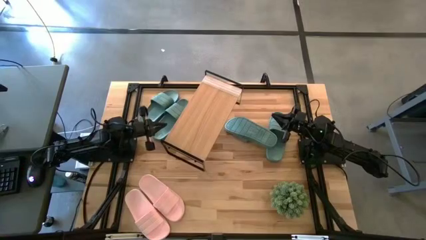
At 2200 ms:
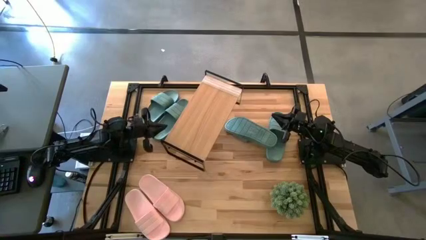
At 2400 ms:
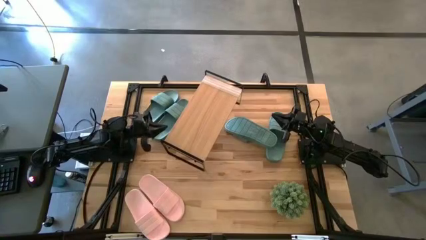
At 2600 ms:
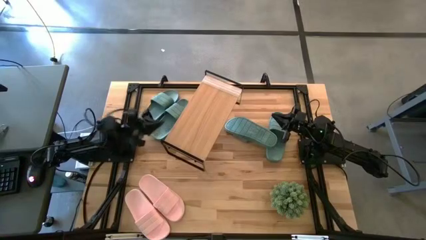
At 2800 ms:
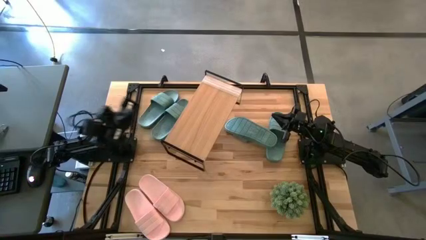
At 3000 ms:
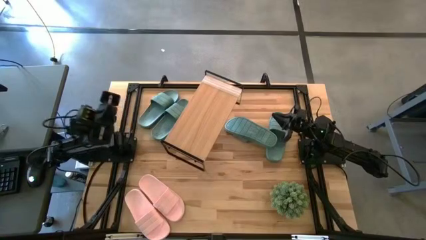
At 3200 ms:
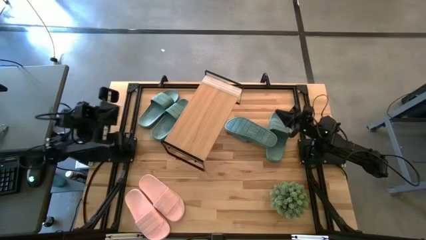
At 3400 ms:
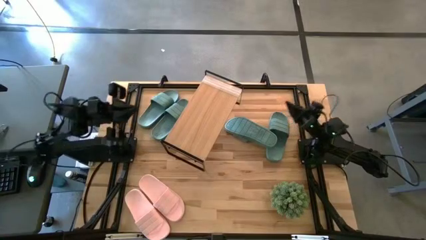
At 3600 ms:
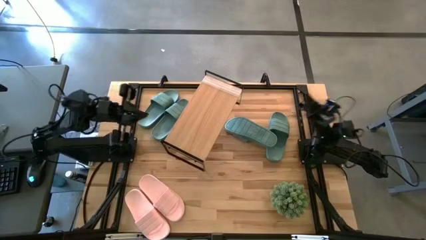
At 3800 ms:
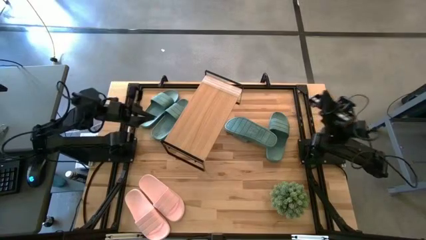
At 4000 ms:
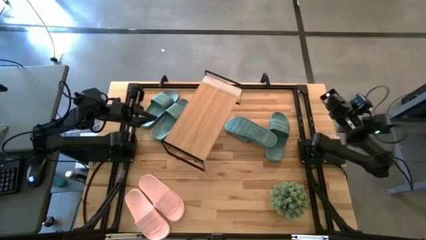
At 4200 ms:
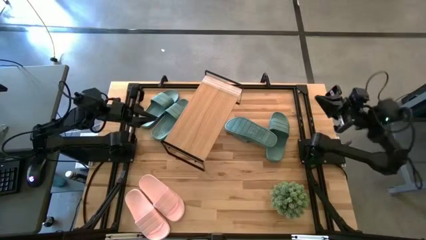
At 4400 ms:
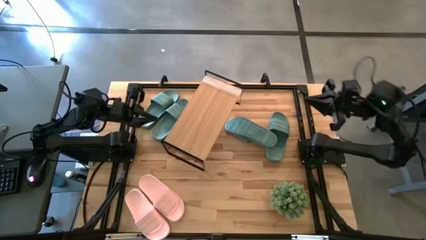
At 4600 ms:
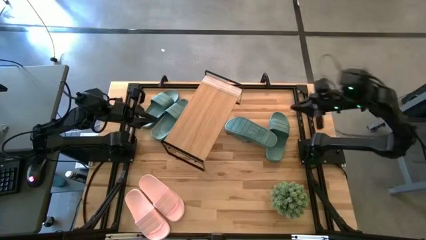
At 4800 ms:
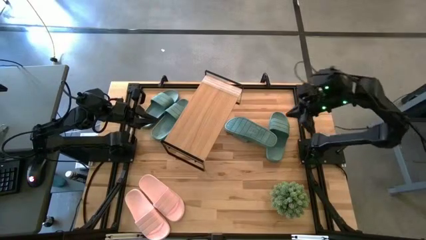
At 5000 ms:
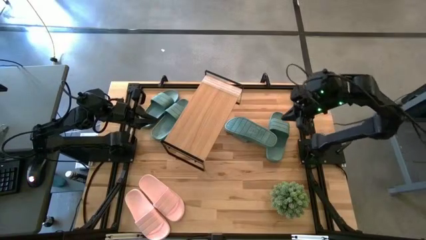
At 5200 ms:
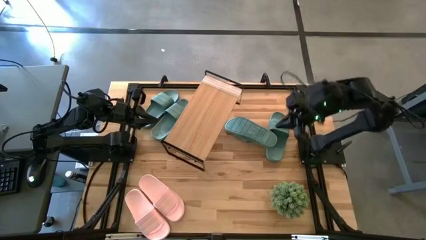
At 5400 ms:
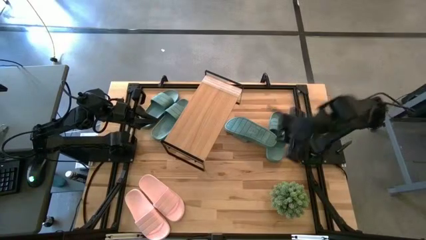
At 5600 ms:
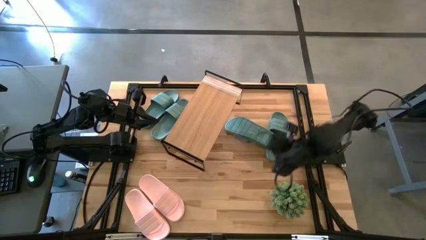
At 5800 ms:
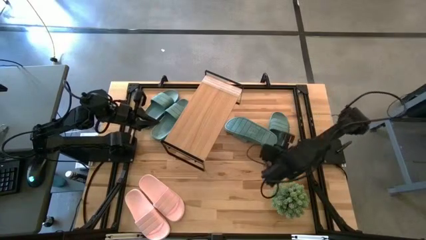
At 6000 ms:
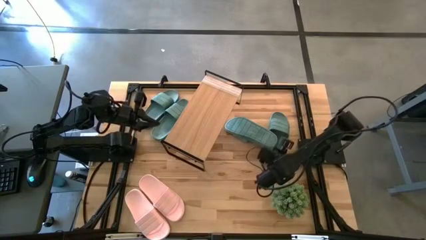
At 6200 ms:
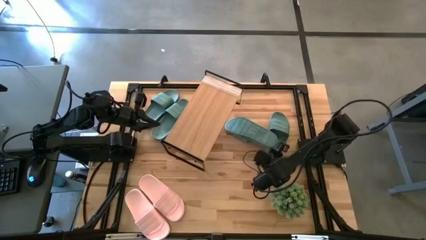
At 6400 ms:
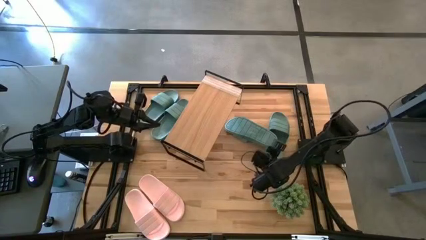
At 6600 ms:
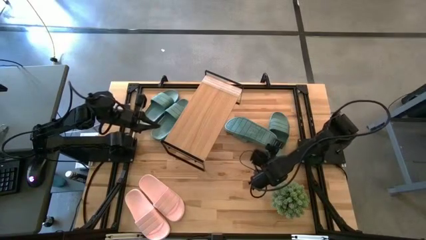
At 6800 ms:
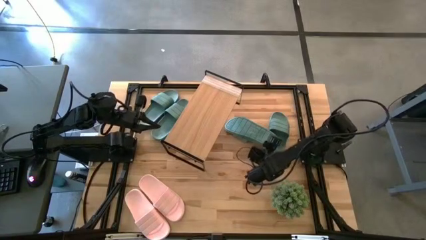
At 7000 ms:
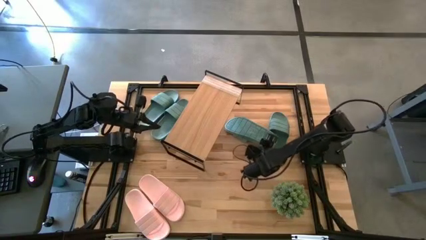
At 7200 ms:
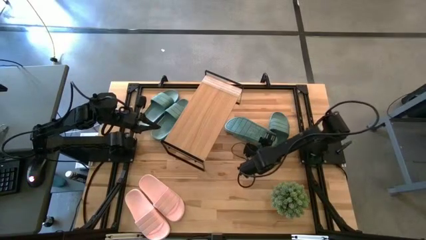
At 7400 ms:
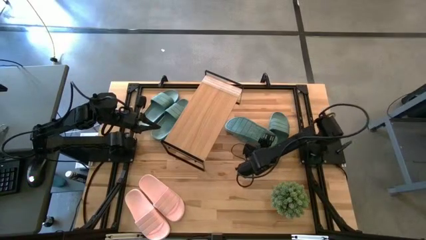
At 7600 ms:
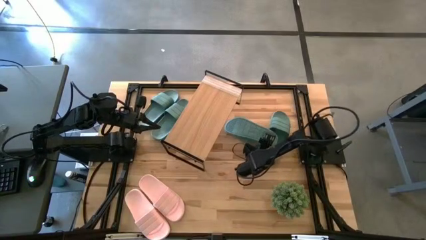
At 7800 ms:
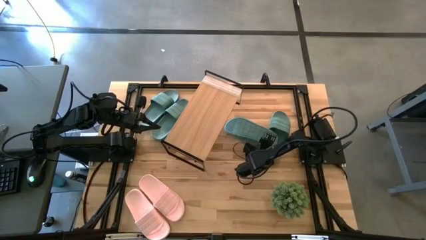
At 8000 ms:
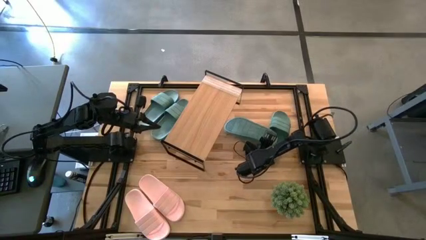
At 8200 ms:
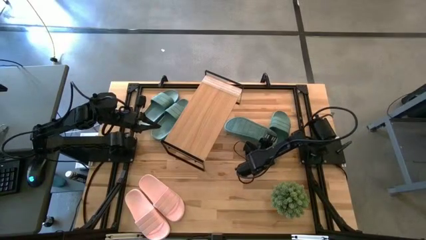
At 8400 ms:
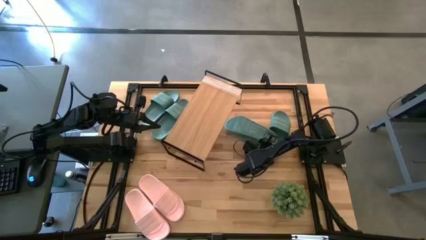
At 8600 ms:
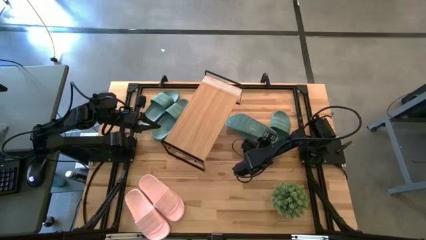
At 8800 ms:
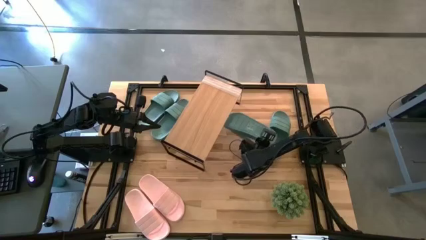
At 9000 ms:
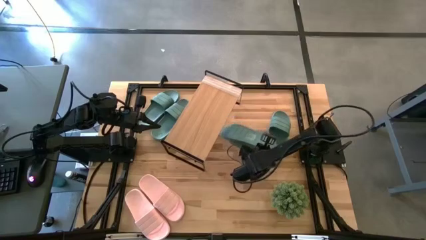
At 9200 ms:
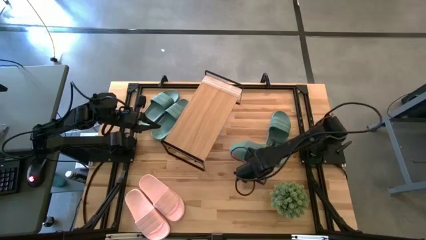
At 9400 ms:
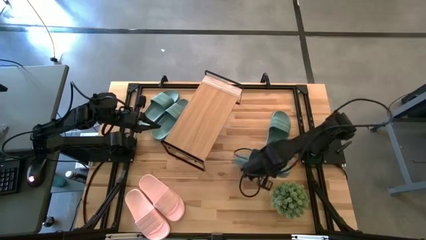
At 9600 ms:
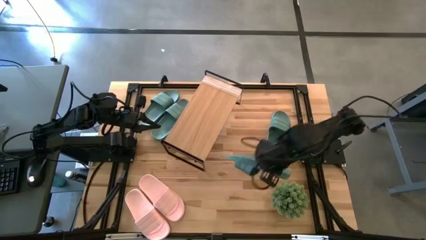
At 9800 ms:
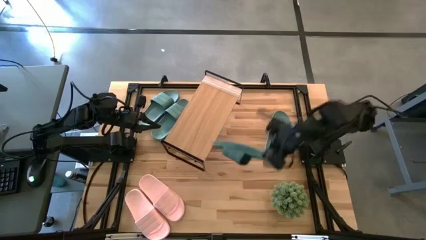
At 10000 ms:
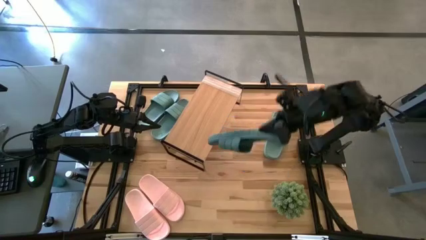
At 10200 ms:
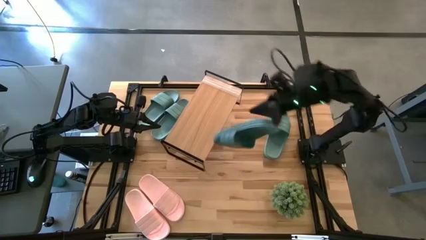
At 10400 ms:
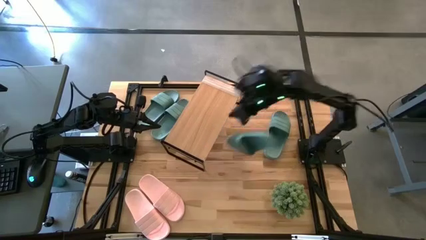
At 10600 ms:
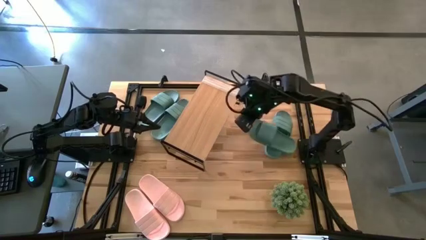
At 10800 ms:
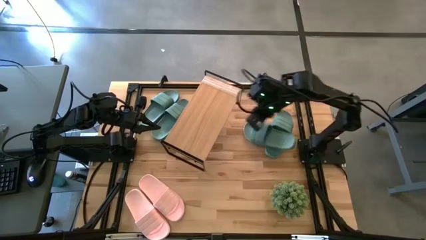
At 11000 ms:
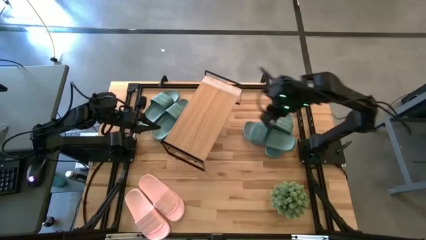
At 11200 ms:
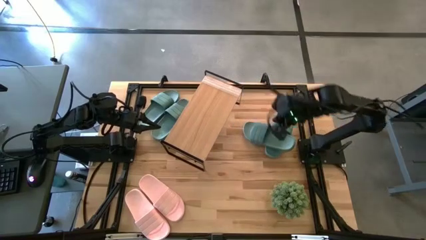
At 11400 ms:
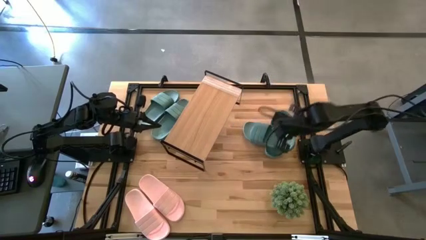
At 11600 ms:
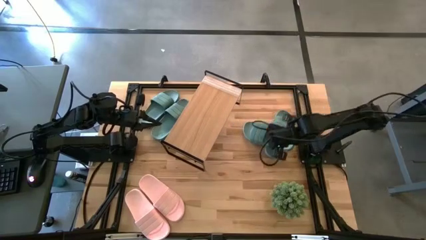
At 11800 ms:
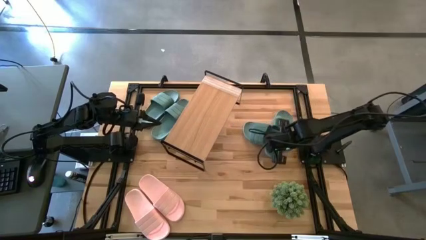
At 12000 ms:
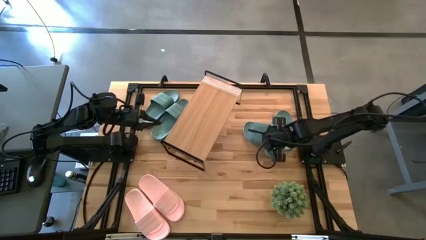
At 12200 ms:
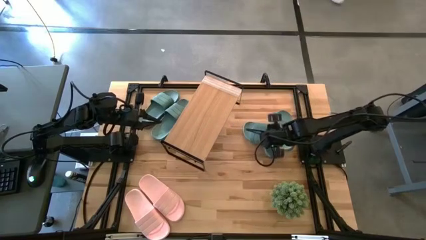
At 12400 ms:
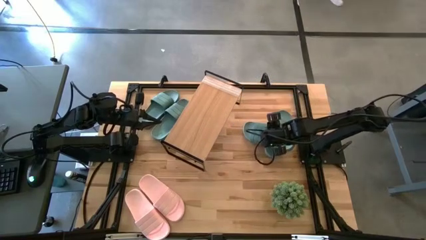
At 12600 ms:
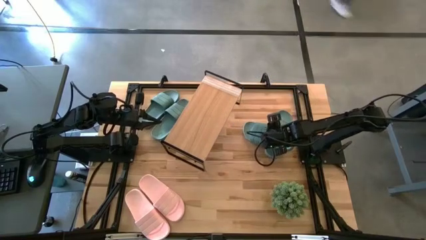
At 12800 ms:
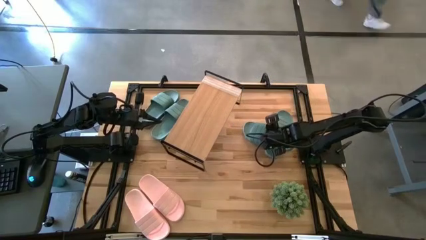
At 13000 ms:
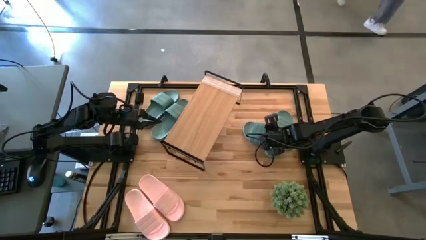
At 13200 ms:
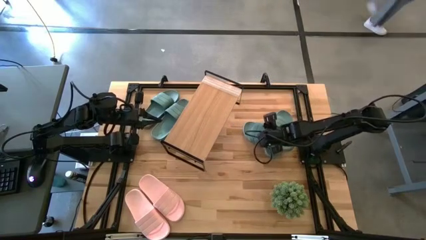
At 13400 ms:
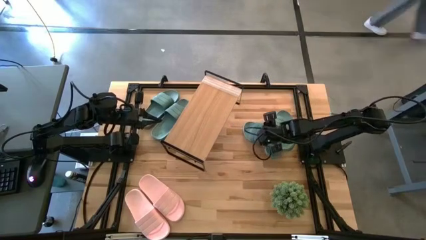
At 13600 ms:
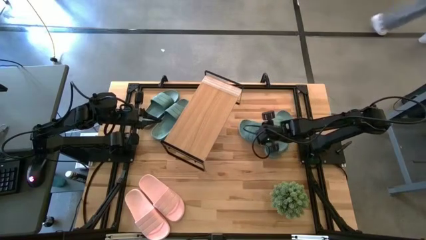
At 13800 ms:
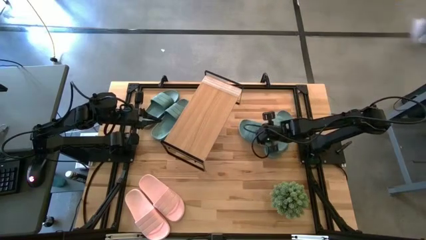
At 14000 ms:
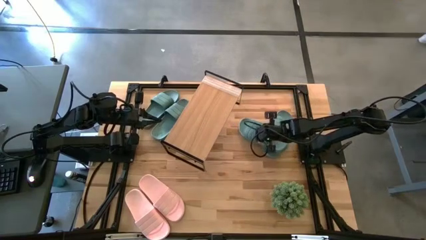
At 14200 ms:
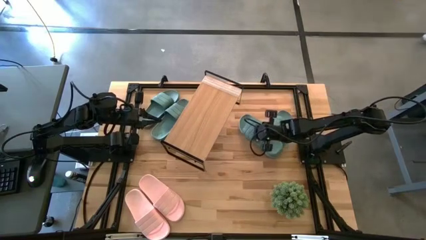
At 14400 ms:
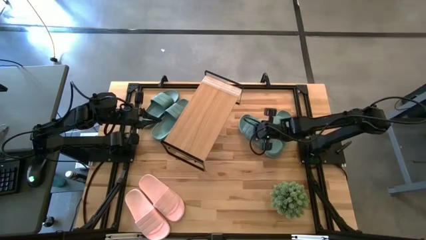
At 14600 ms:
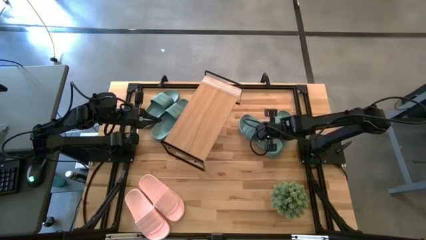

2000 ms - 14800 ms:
Task: Pick and place slides into the shelf
Put the green slide on the shelf

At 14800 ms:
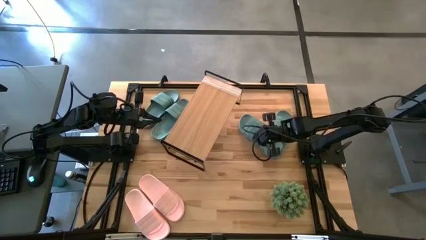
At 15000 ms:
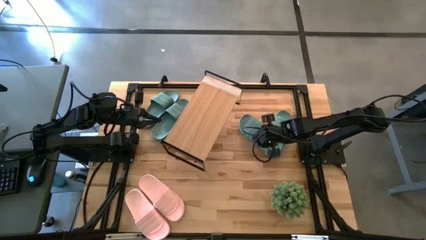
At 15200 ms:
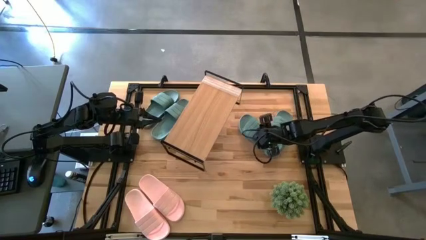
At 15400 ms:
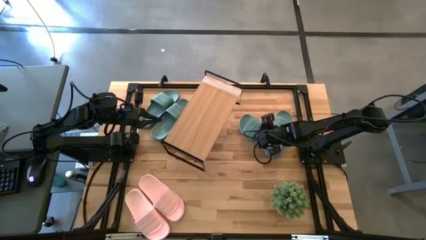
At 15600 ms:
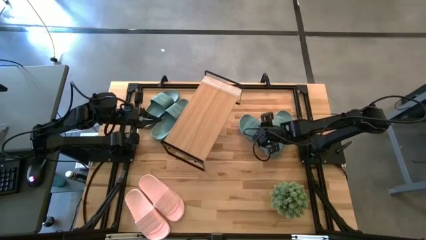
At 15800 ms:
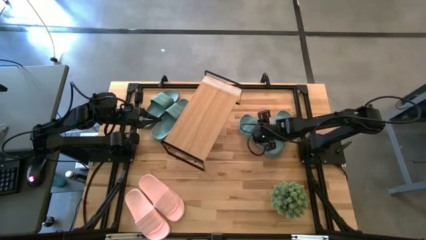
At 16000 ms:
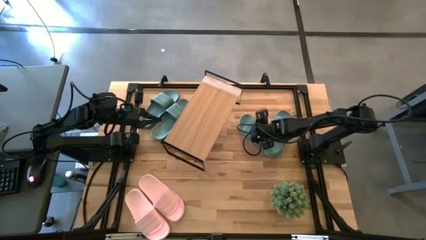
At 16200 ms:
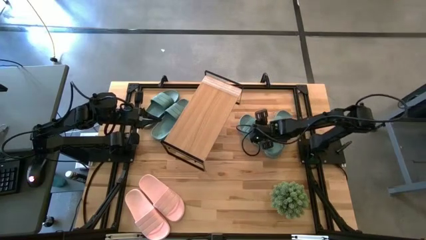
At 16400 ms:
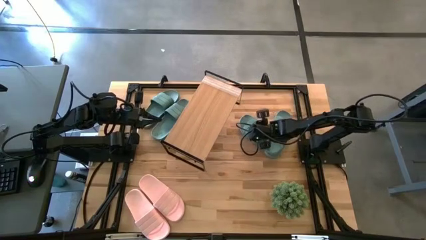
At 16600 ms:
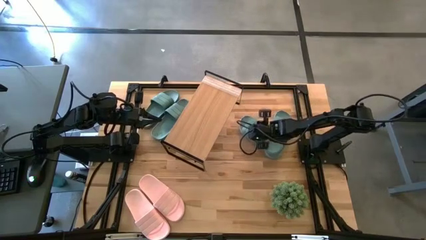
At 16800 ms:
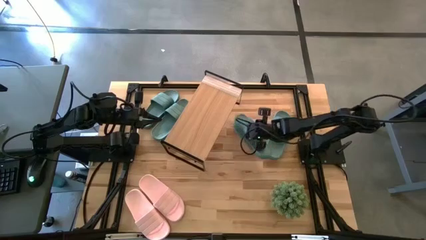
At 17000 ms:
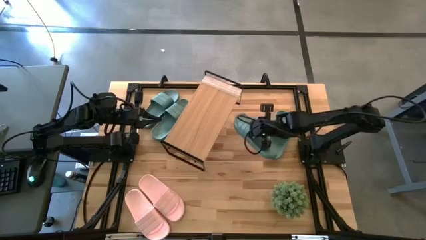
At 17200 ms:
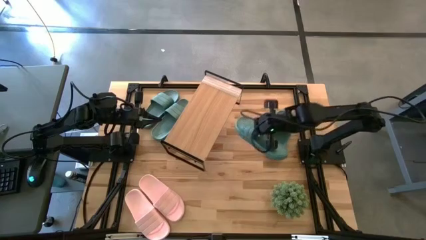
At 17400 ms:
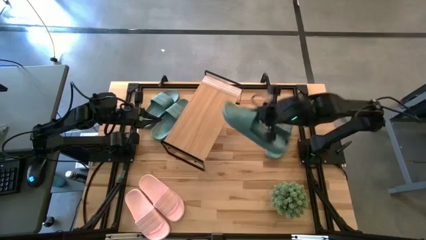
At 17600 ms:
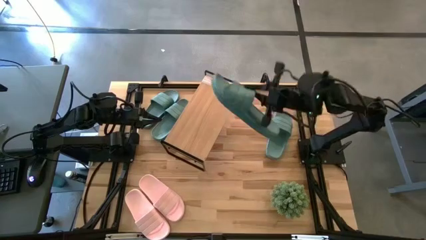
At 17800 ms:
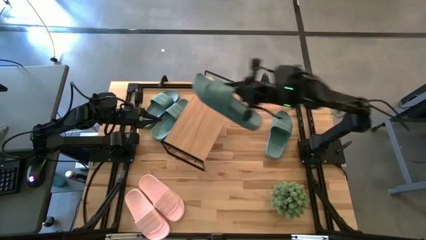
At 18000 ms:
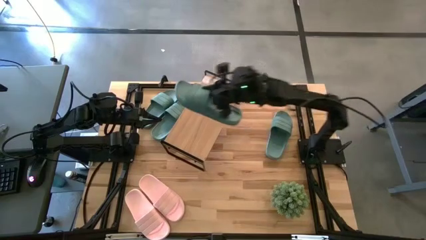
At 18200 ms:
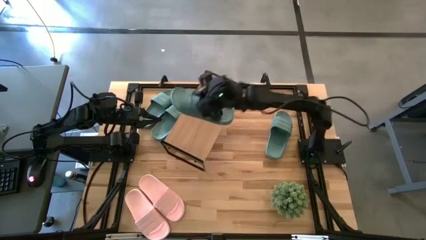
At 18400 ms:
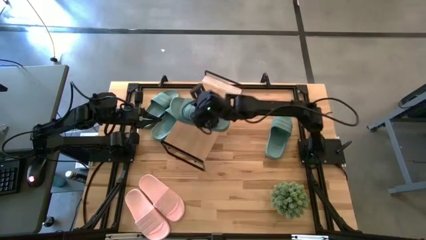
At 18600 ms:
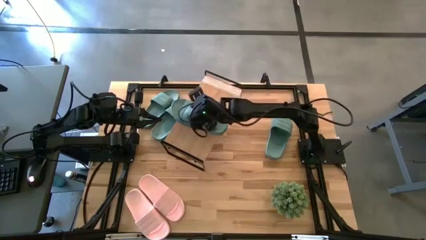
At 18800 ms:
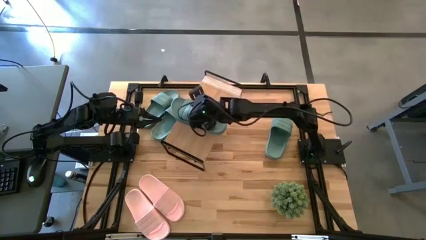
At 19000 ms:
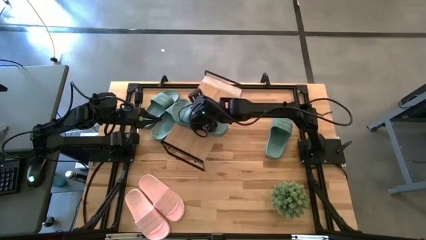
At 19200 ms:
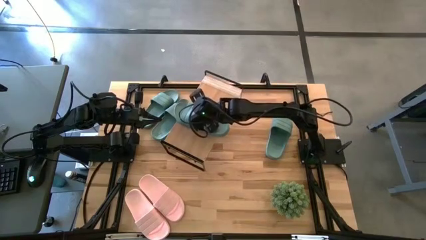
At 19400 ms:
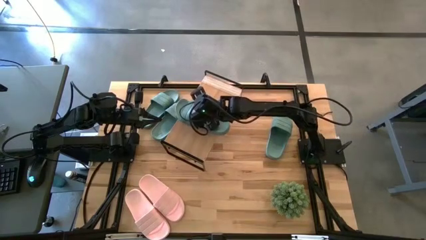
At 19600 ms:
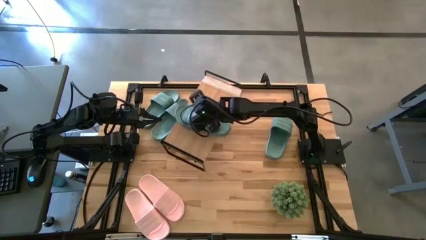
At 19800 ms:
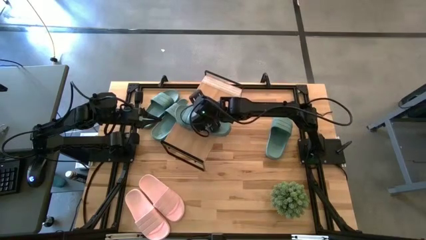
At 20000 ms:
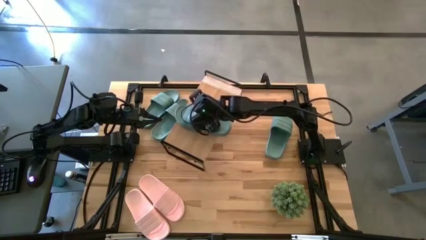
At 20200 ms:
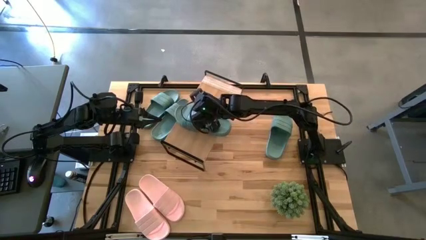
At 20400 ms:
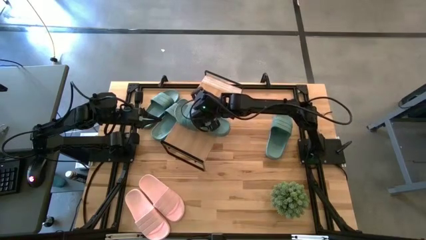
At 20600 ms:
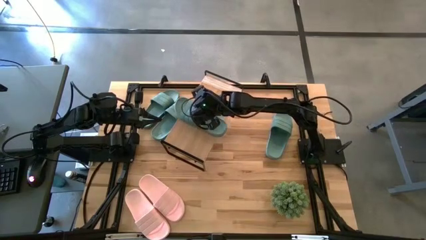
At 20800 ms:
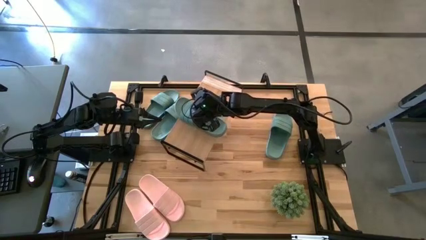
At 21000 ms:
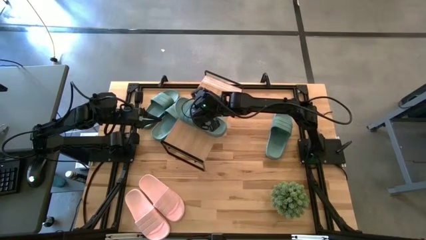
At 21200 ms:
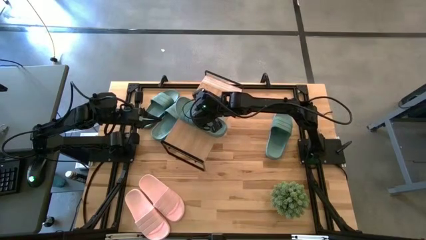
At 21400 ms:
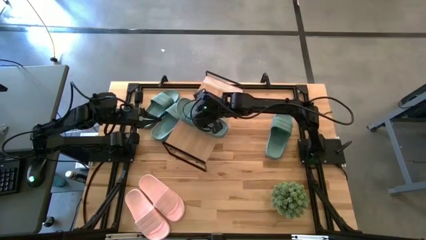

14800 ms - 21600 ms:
Put the green slide on the shelf
